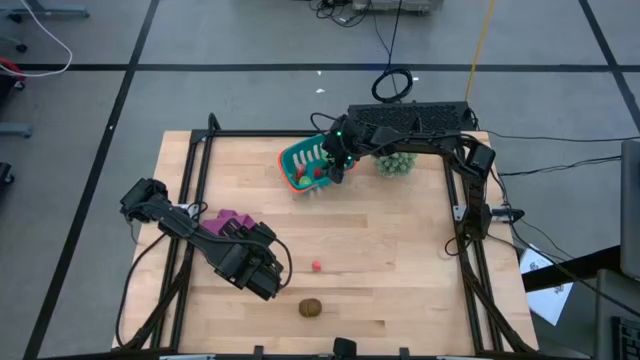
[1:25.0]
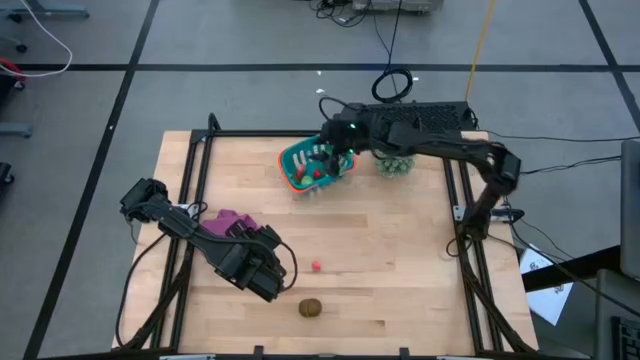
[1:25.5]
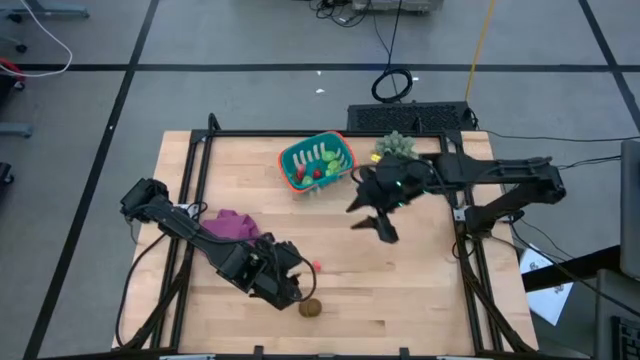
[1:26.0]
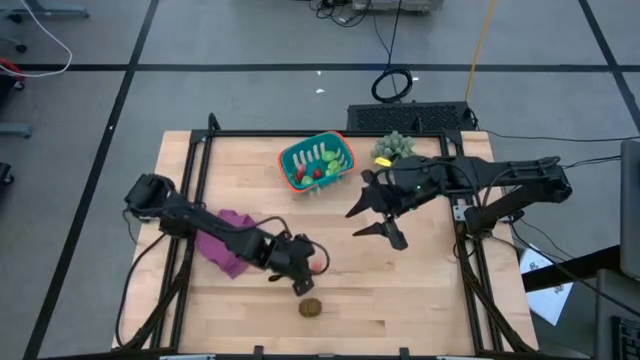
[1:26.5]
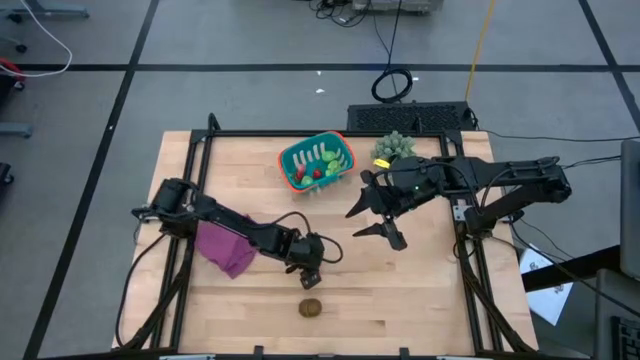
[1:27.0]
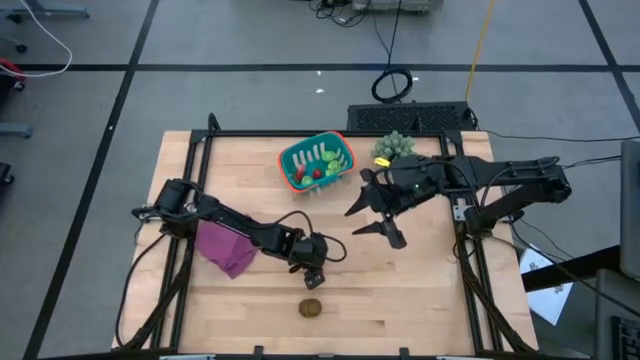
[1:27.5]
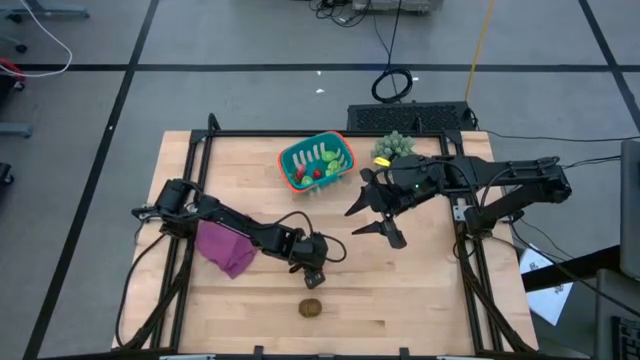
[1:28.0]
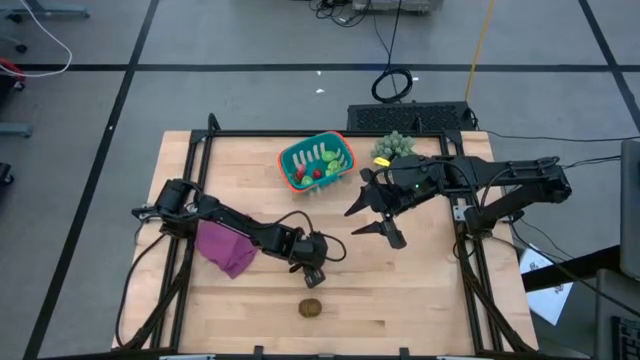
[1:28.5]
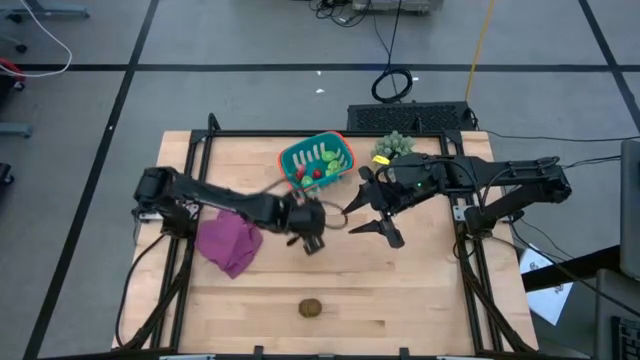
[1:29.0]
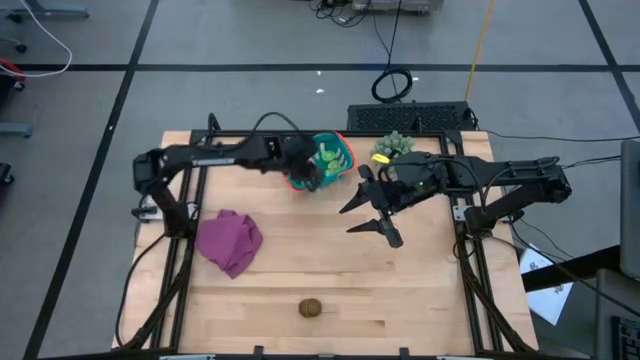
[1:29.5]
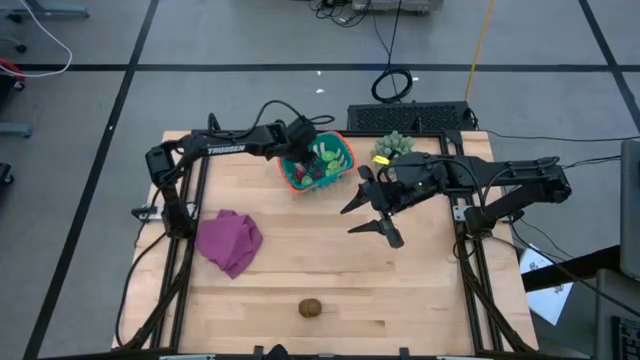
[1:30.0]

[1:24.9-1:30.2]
Task: Pick and placing Produce into tupperware
Put the lychee into the blue basket

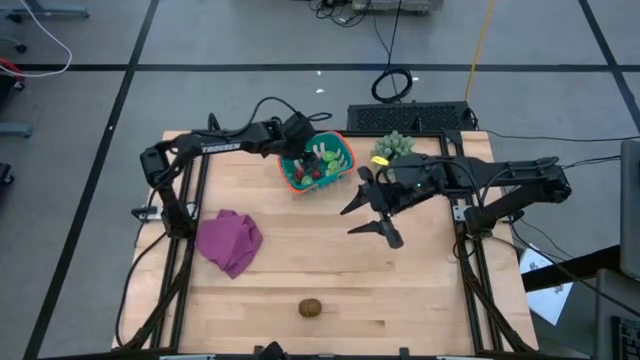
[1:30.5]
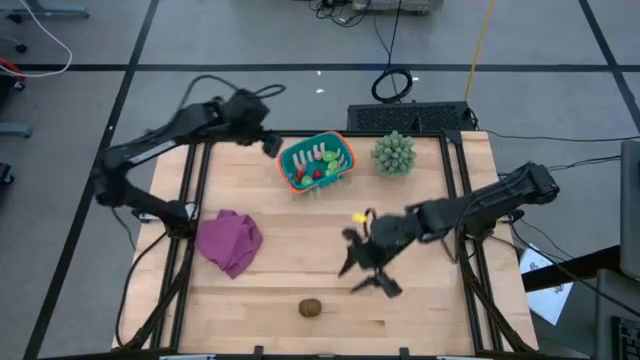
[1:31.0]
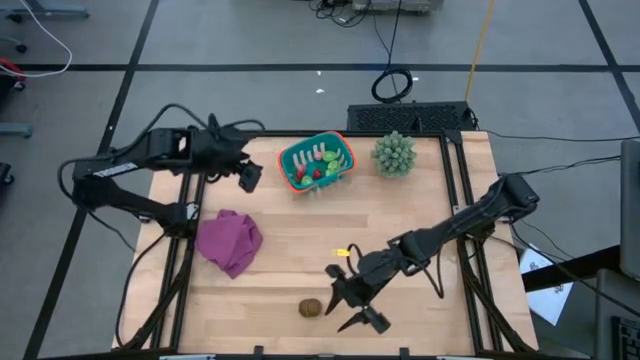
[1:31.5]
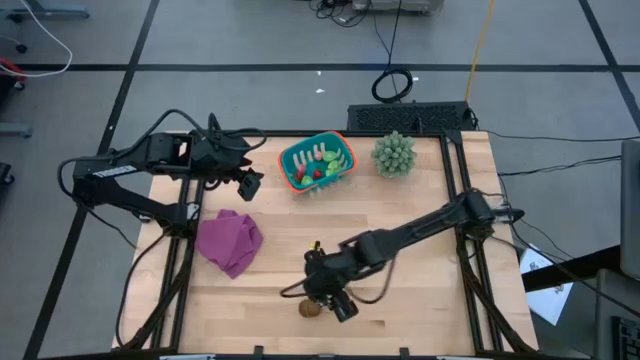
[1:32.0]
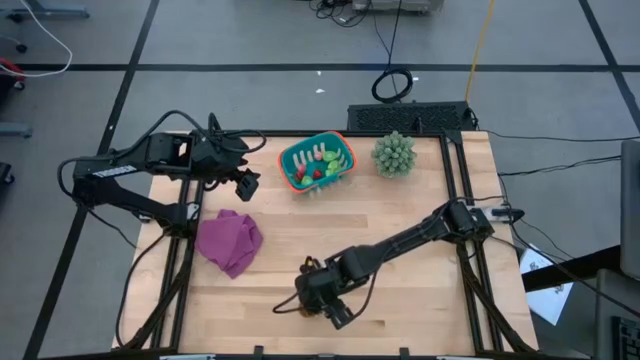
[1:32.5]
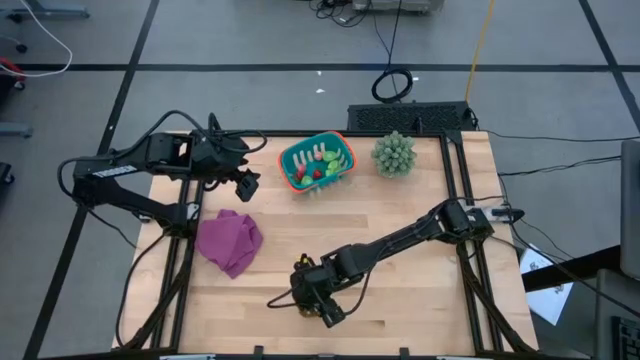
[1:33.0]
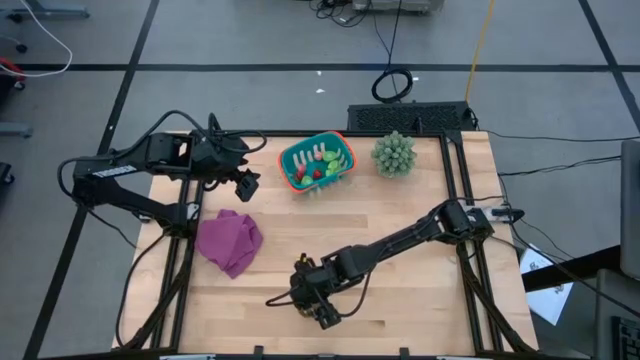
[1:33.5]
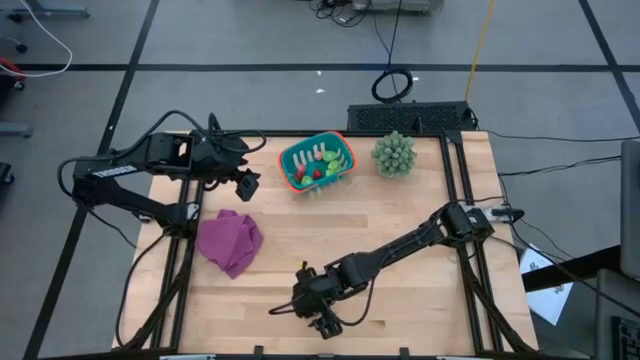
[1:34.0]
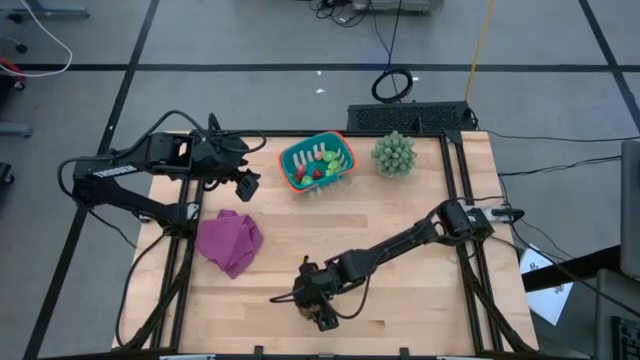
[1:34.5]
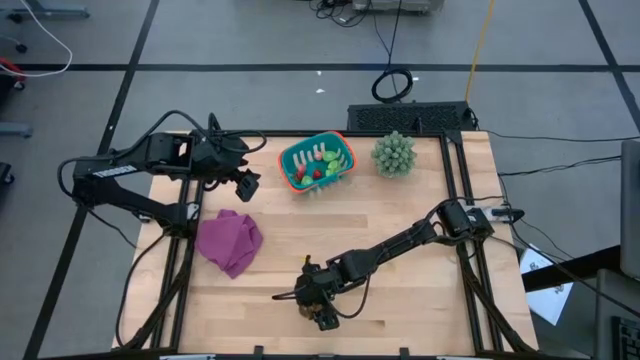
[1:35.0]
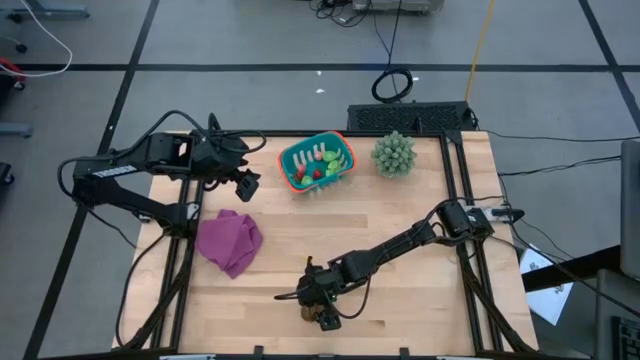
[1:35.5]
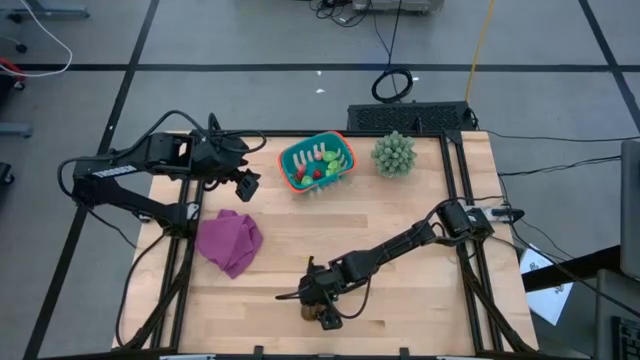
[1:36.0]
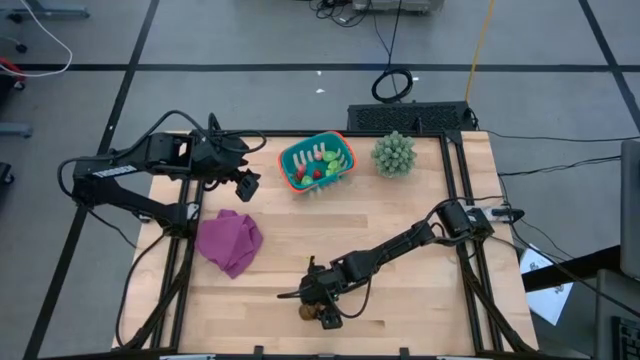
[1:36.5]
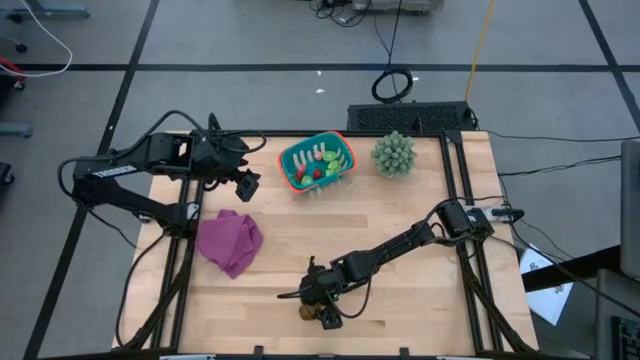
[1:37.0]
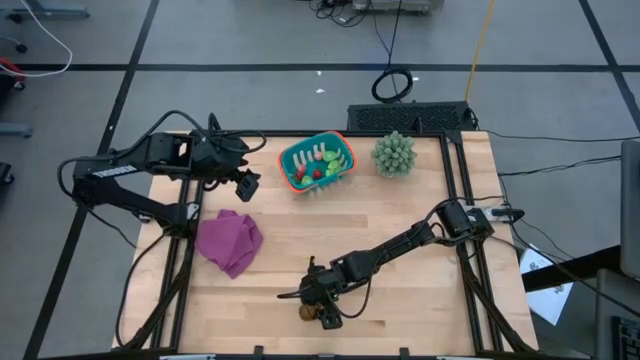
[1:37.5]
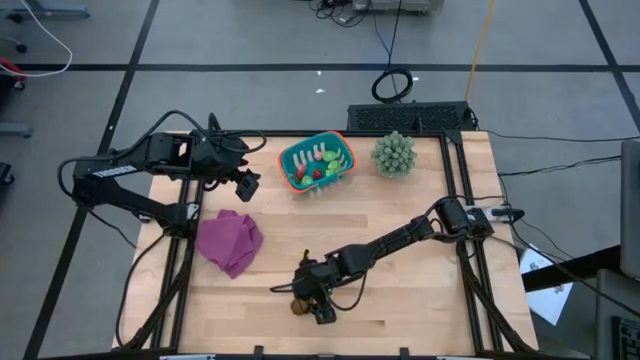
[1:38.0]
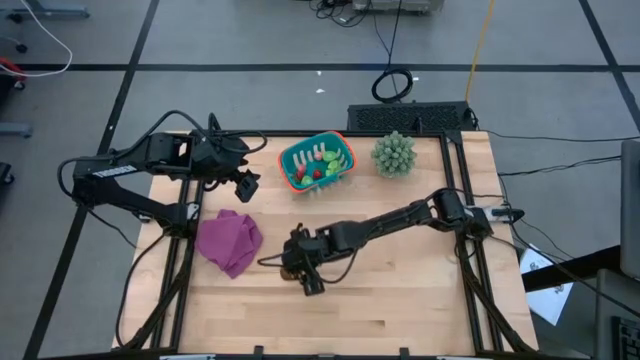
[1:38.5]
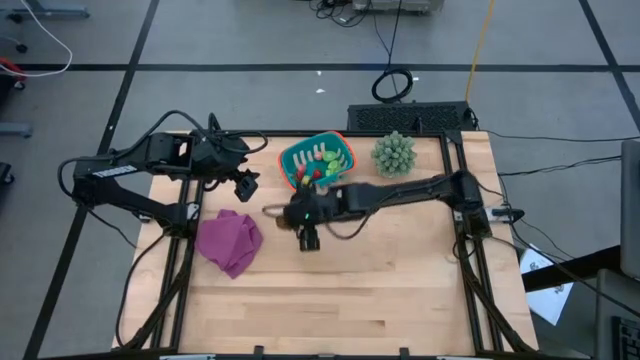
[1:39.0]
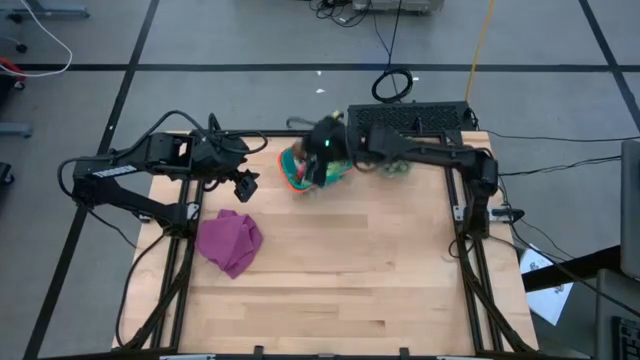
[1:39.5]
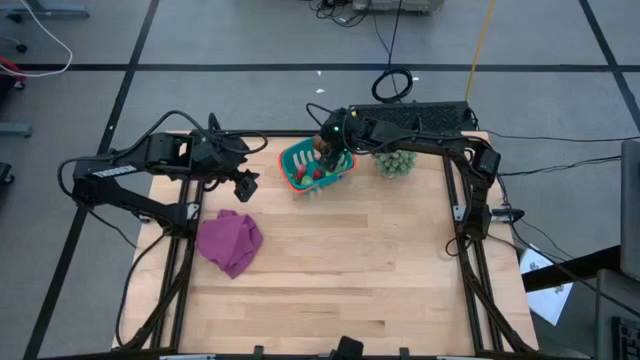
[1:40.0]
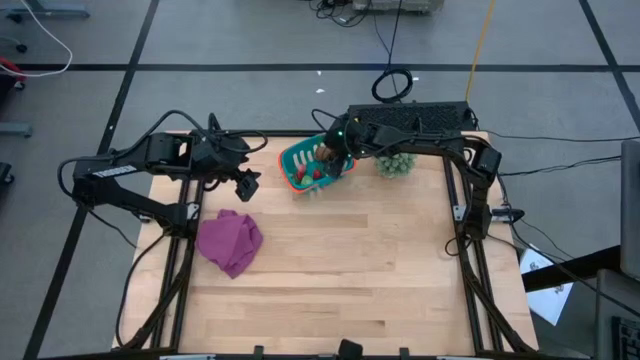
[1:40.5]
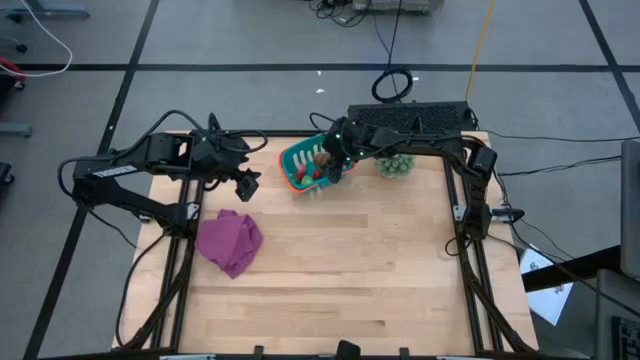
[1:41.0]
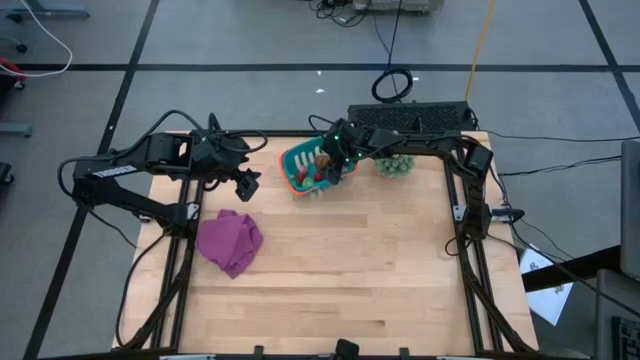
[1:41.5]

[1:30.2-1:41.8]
Put the kiwi into the blue basket

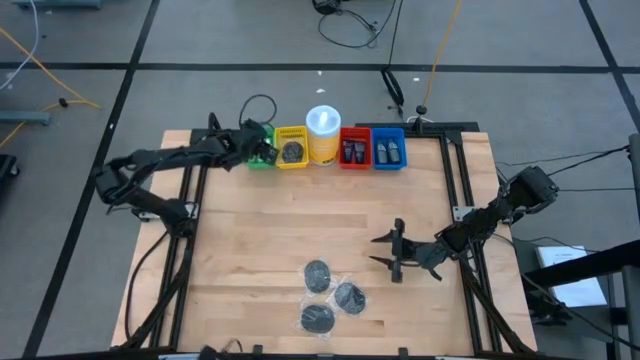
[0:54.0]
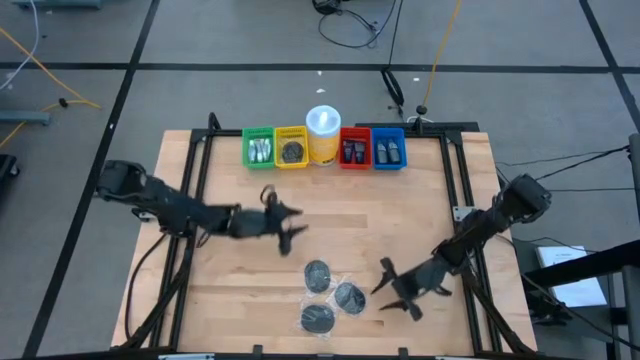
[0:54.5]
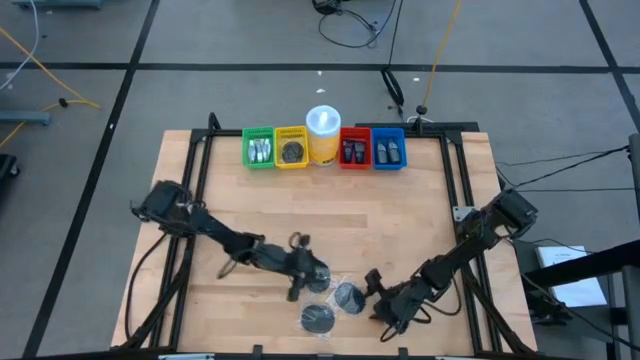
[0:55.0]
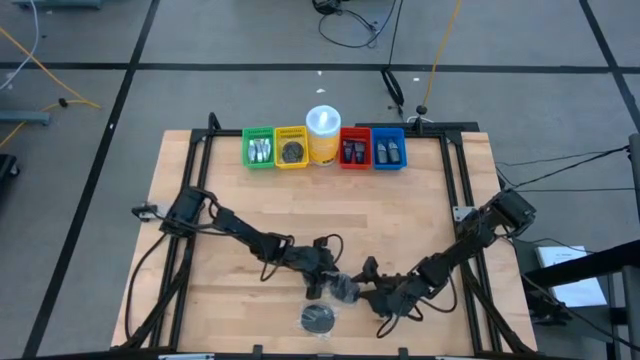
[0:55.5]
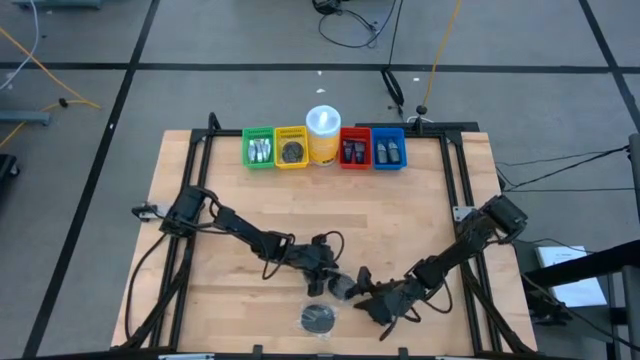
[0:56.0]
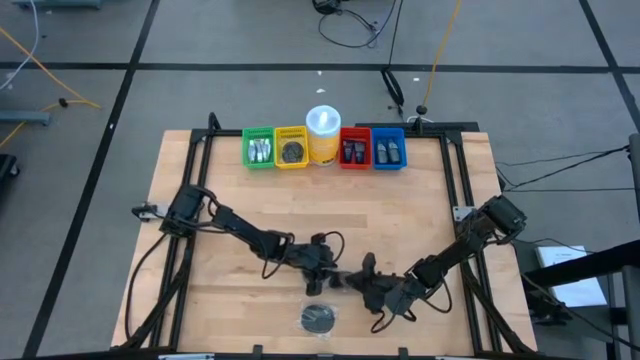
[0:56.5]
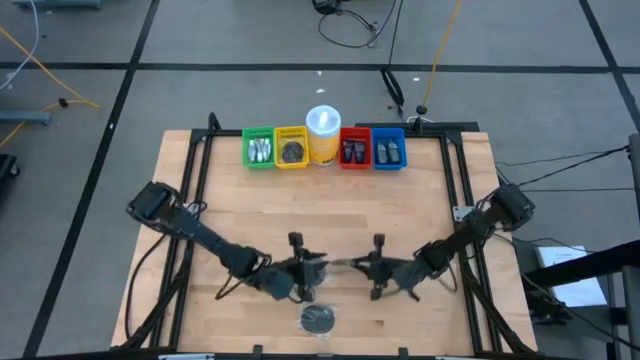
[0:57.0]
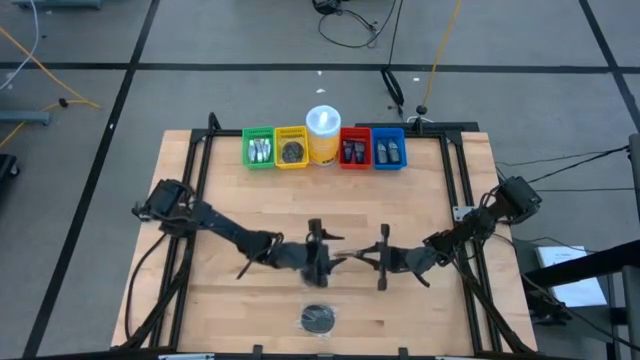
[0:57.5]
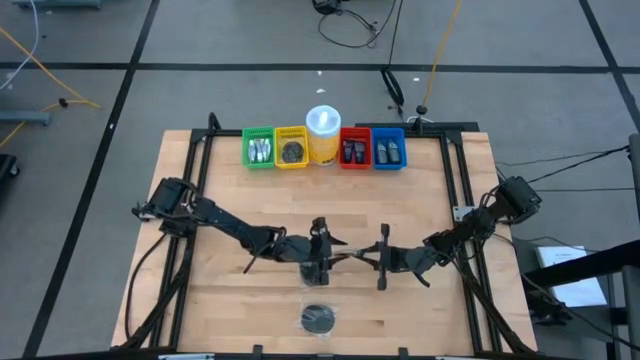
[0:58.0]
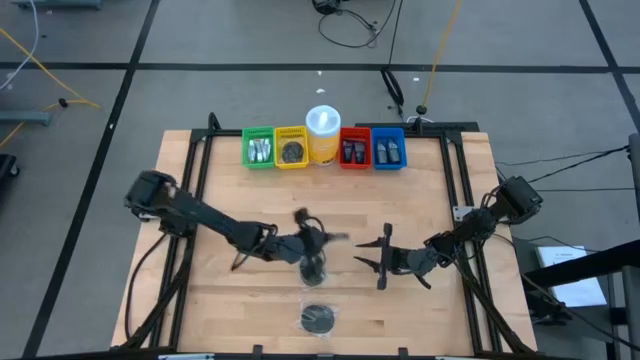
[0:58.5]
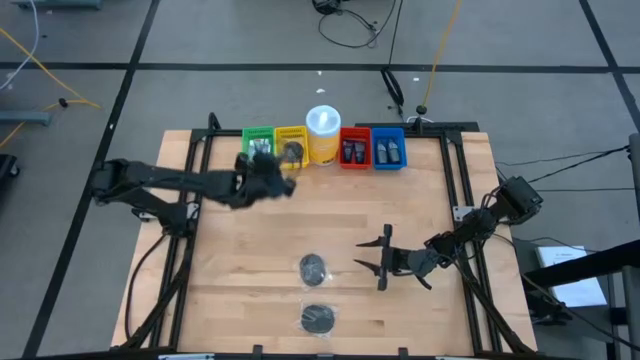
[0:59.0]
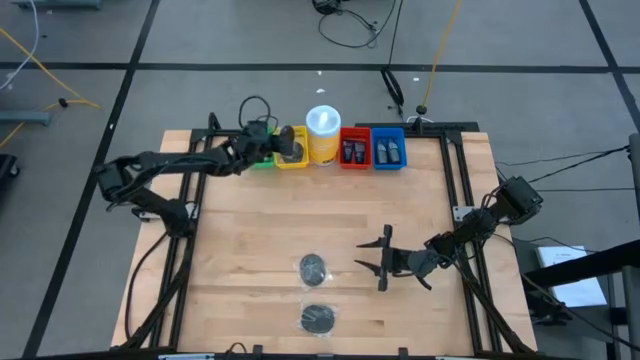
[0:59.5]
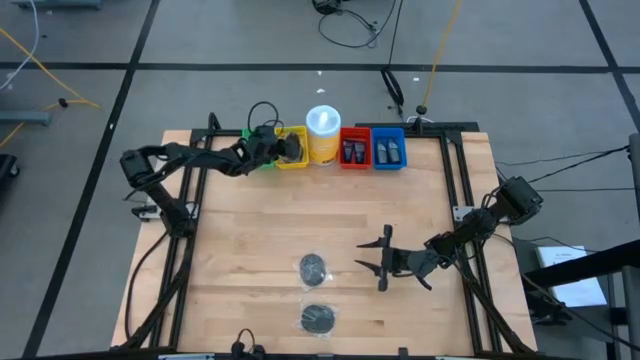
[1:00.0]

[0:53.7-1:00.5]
Task: Pick & Place Travel size toiletries
Put the black hairbrush into the yellow basket
